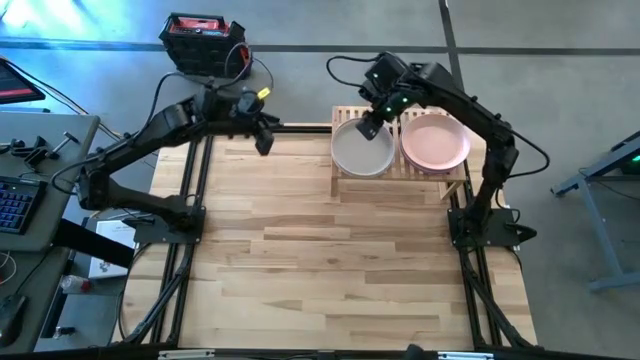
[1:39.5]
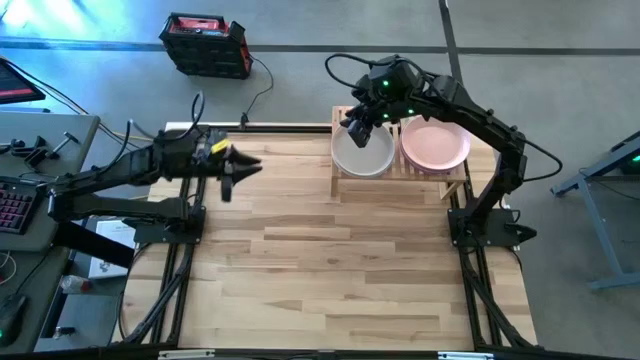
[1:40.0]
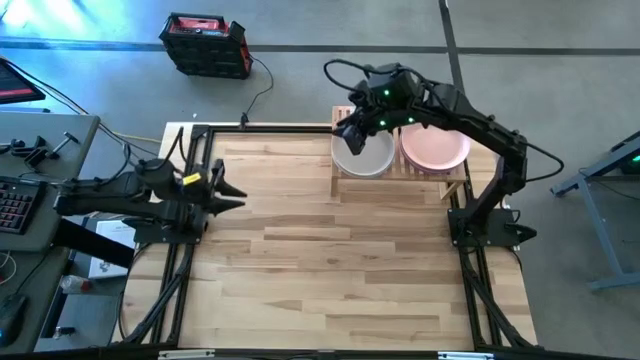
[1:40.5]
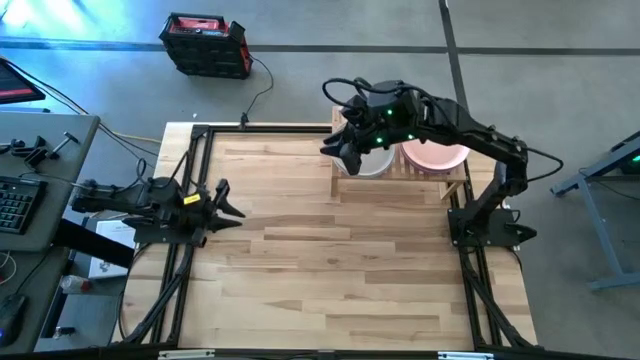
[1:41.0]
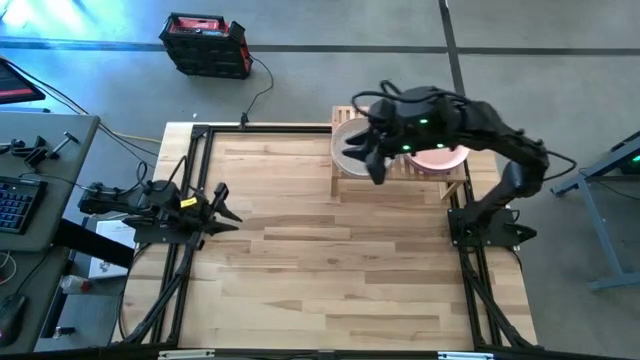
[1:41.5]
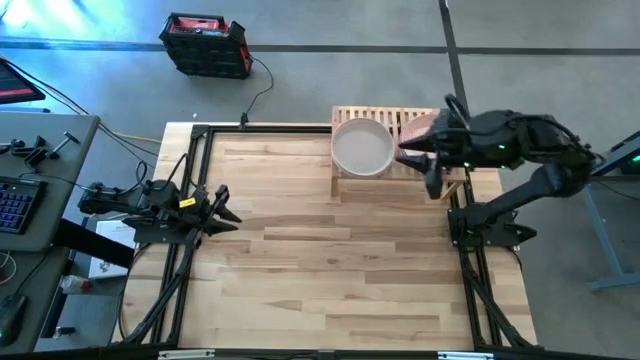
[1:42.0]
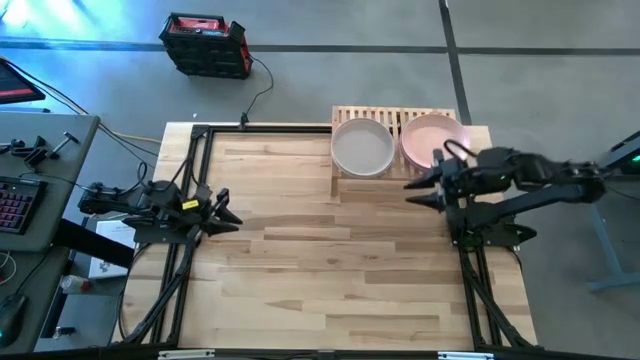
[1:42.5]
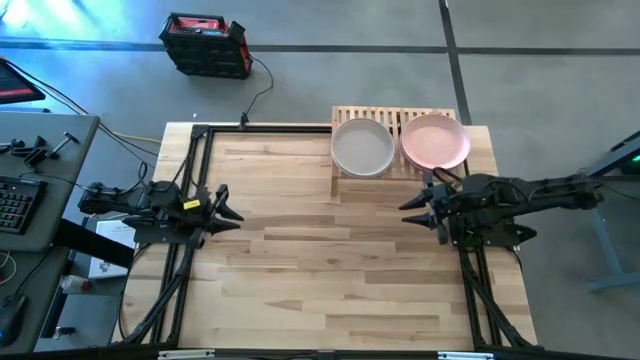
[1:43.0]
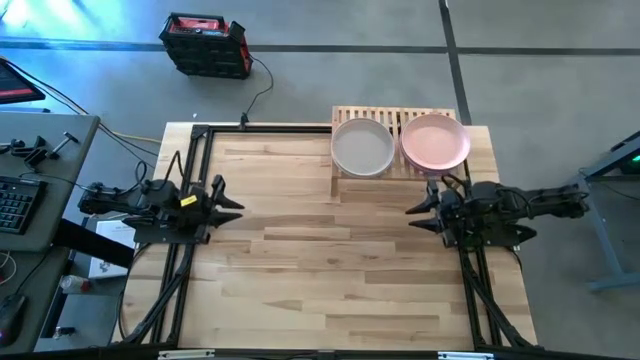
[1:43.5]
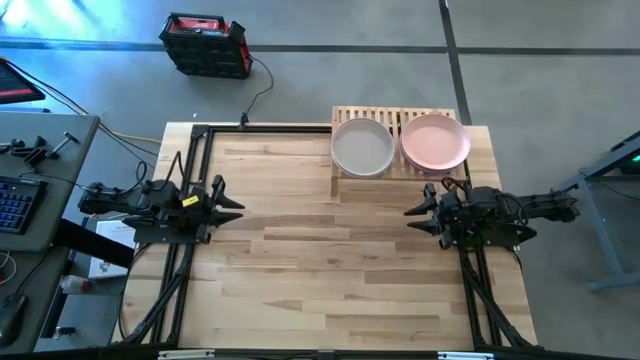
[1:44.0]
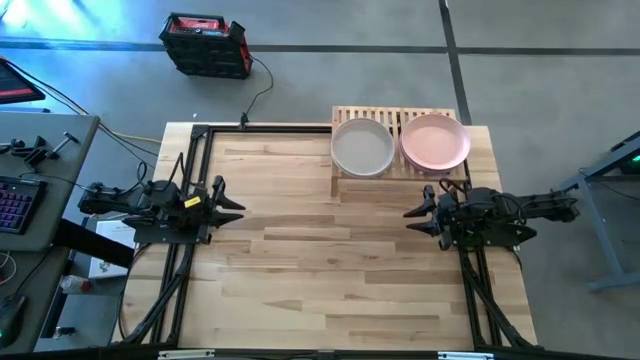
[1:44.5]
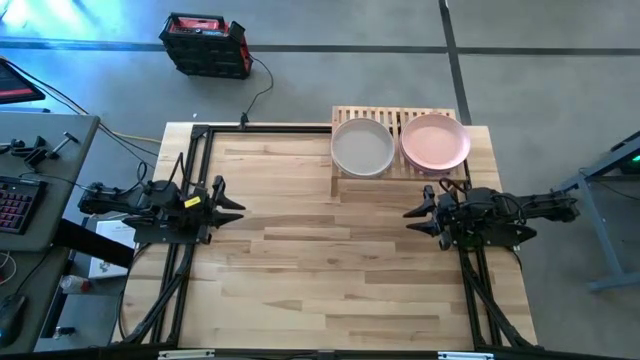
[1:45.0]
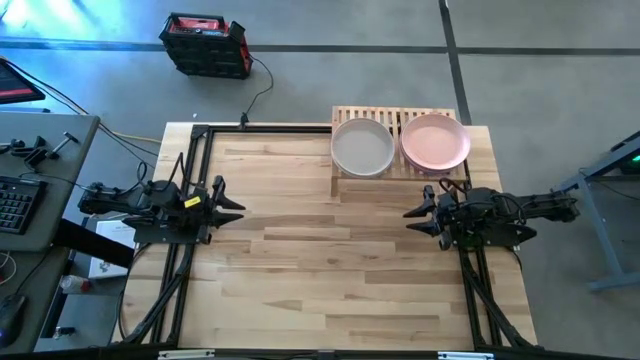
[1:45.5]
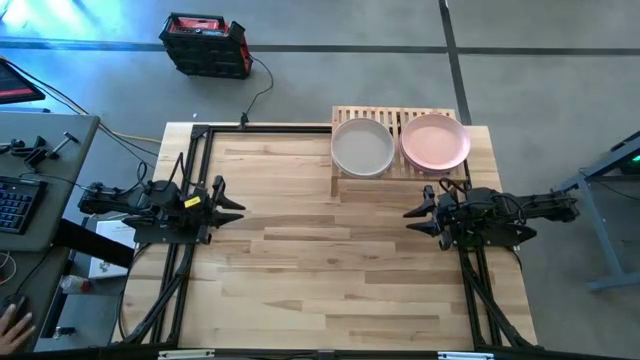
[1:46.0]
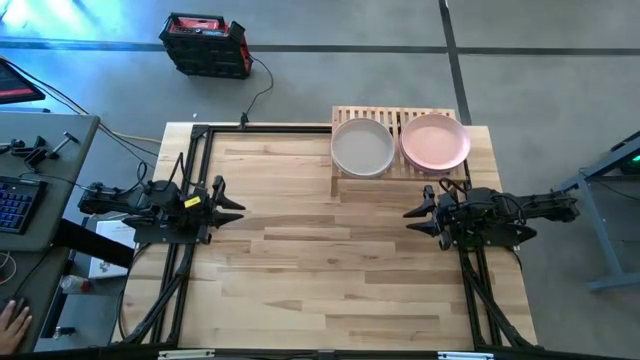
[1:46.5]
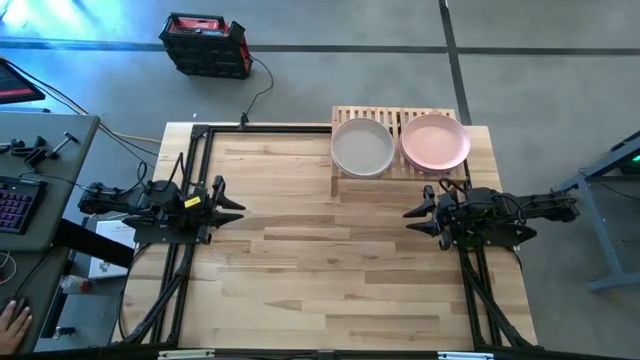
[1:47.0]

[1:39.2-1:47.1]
Task: Place and stack plates onto a shelf
Return to Home Position

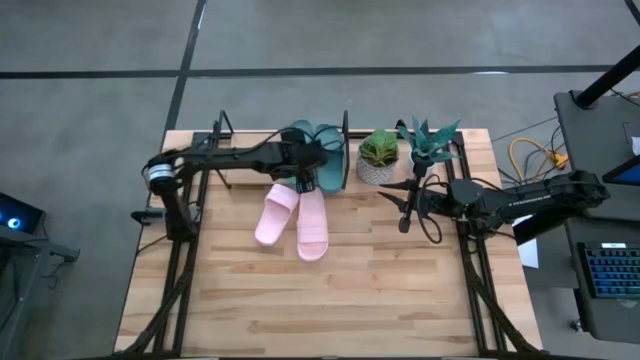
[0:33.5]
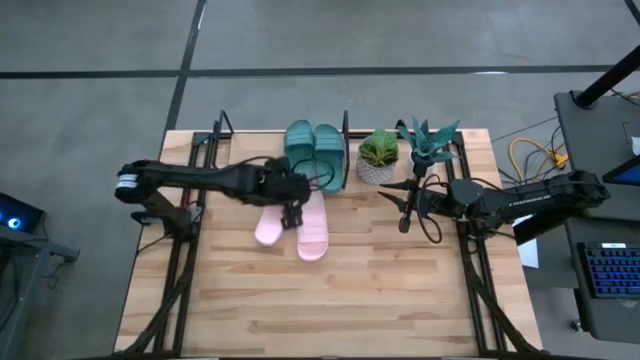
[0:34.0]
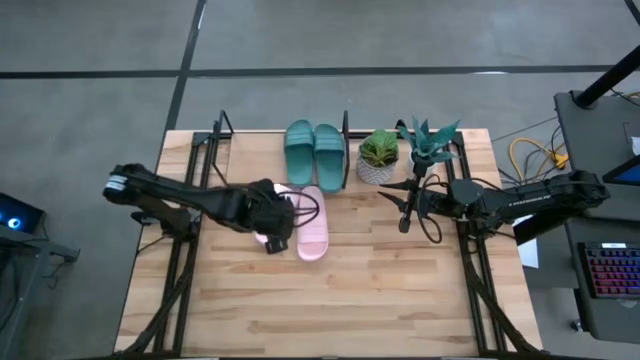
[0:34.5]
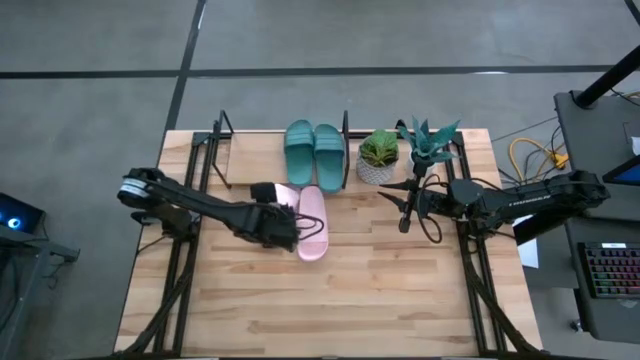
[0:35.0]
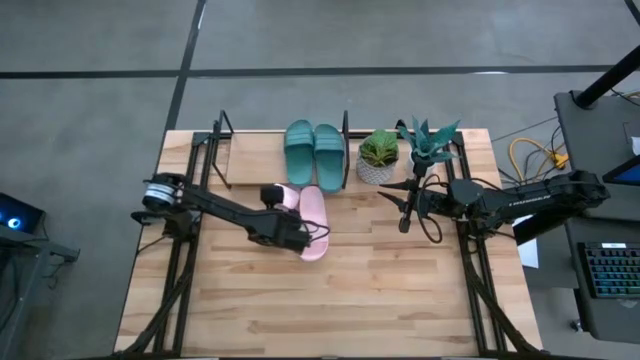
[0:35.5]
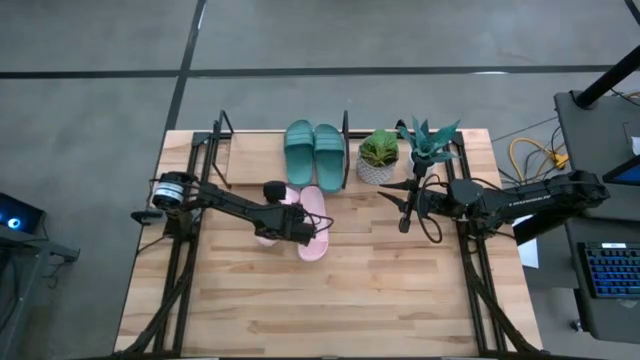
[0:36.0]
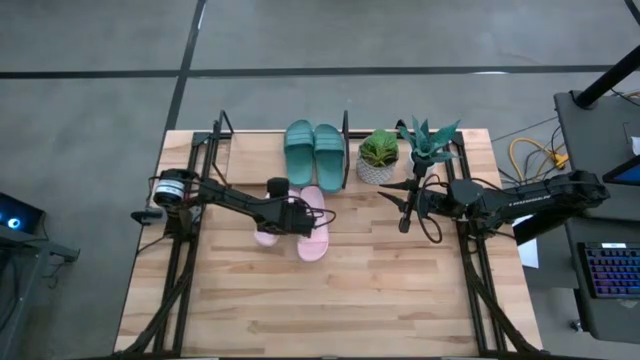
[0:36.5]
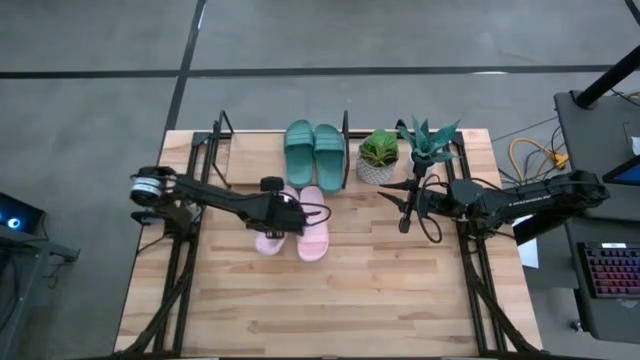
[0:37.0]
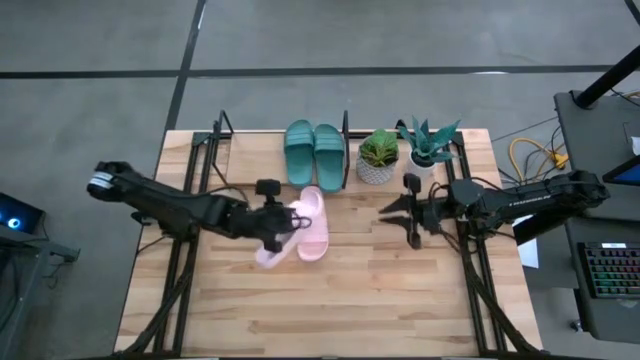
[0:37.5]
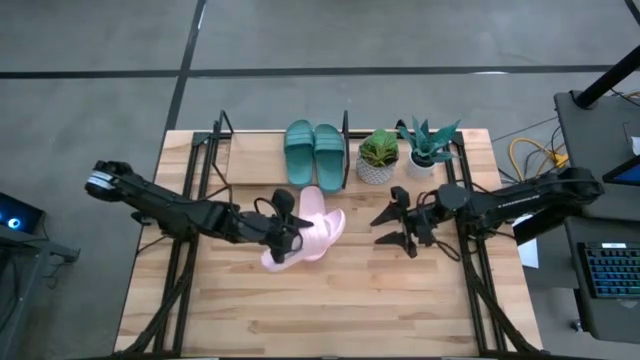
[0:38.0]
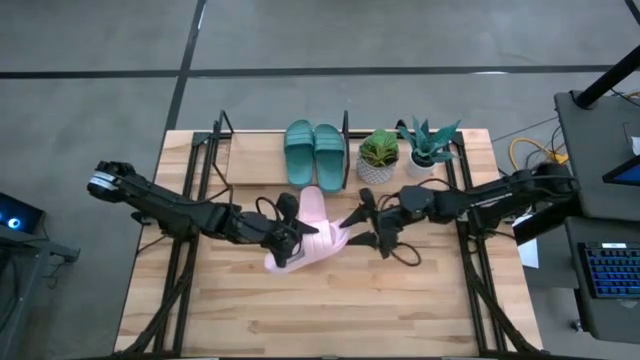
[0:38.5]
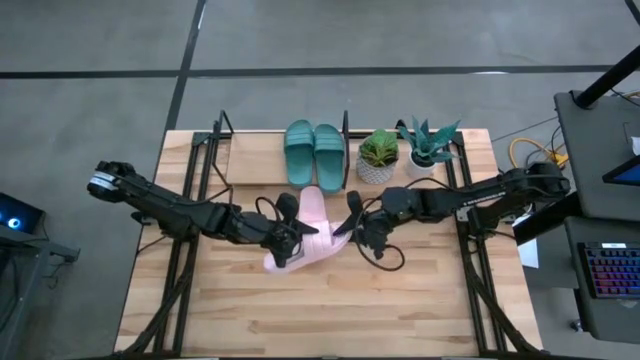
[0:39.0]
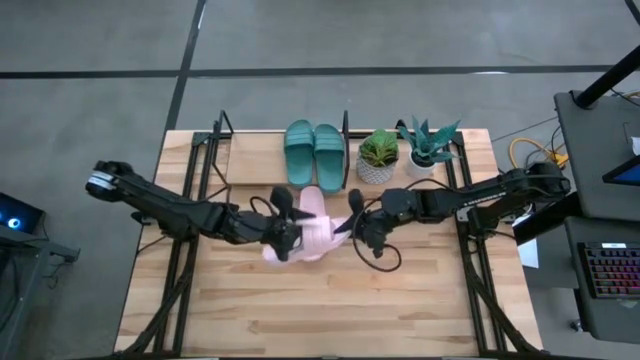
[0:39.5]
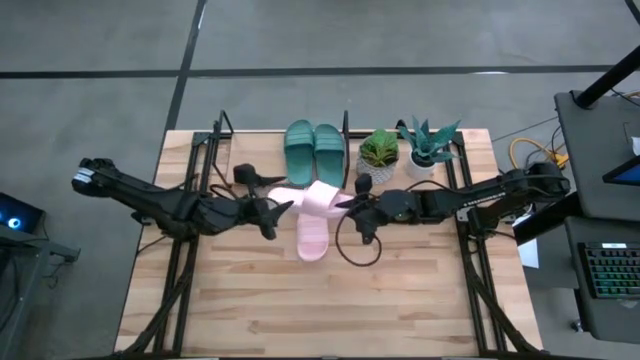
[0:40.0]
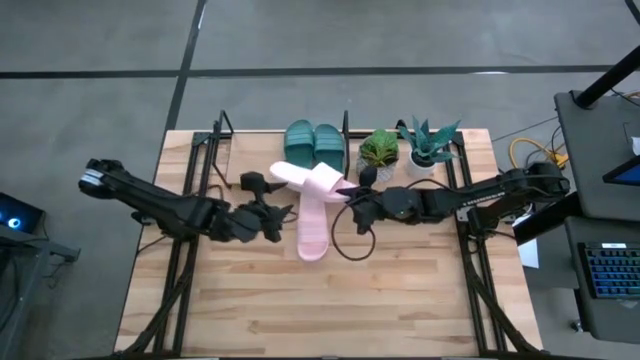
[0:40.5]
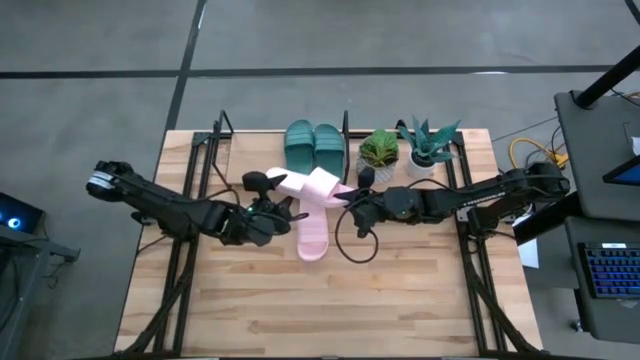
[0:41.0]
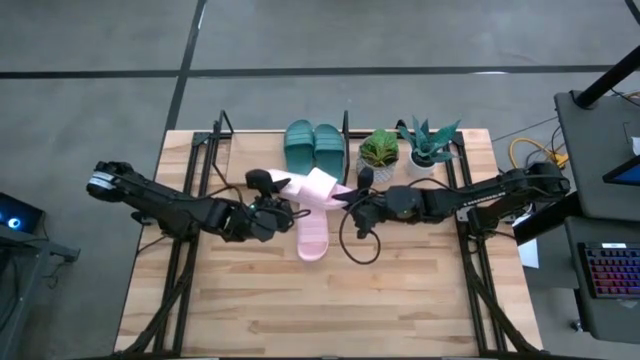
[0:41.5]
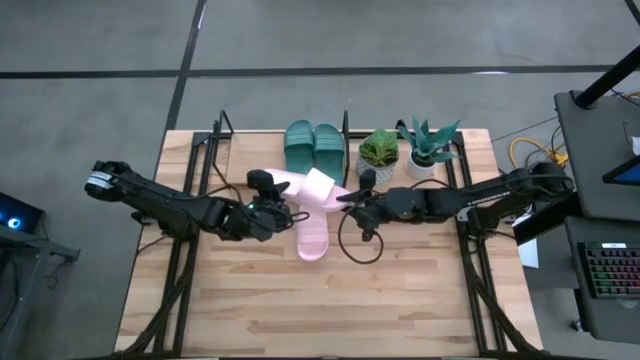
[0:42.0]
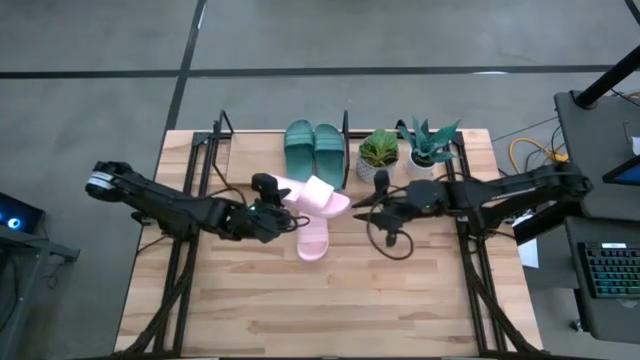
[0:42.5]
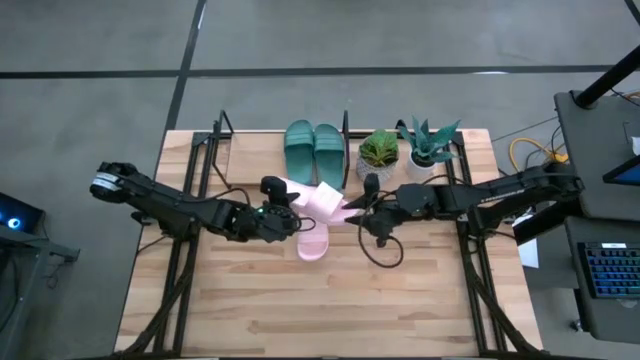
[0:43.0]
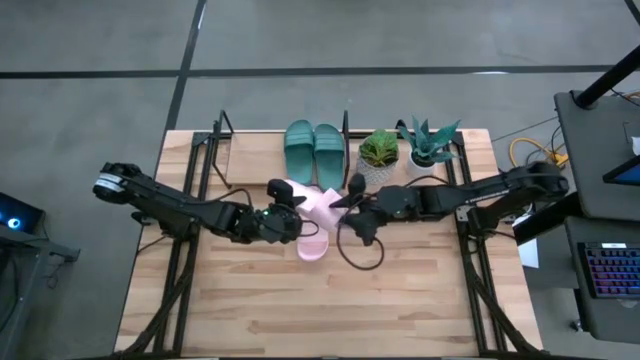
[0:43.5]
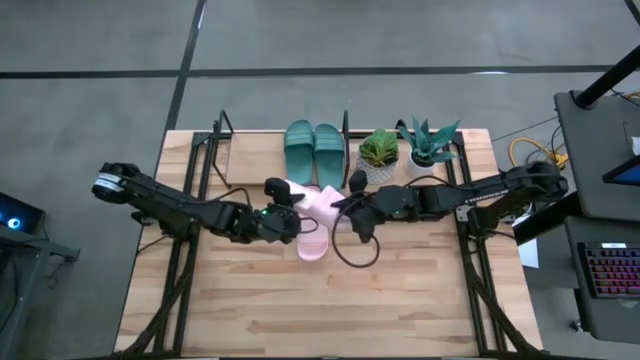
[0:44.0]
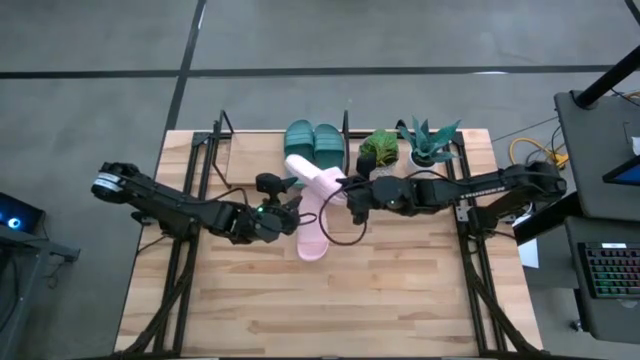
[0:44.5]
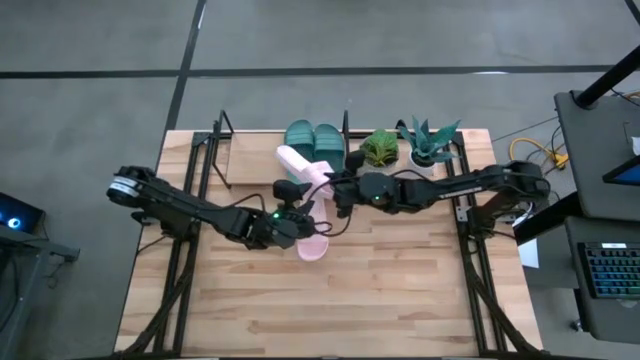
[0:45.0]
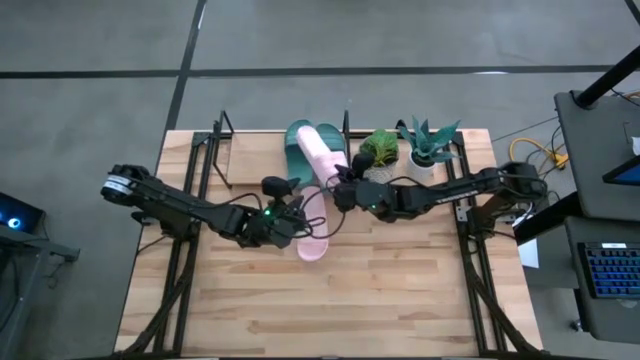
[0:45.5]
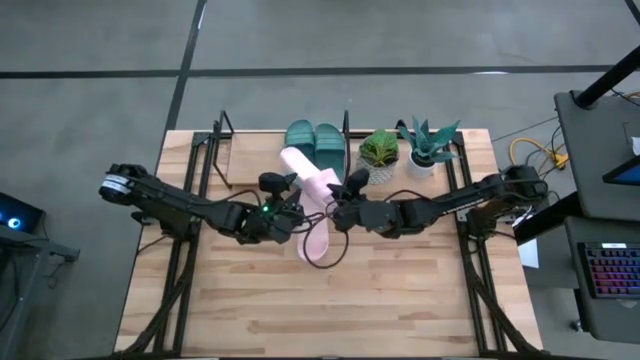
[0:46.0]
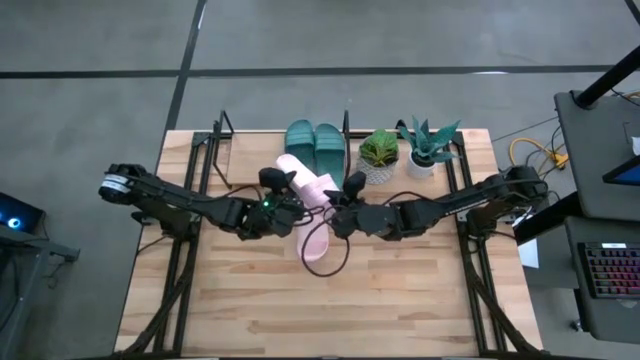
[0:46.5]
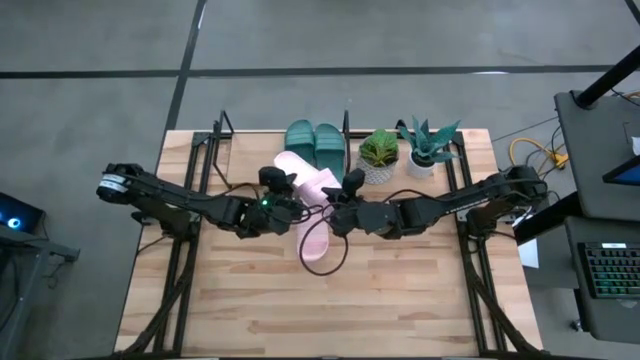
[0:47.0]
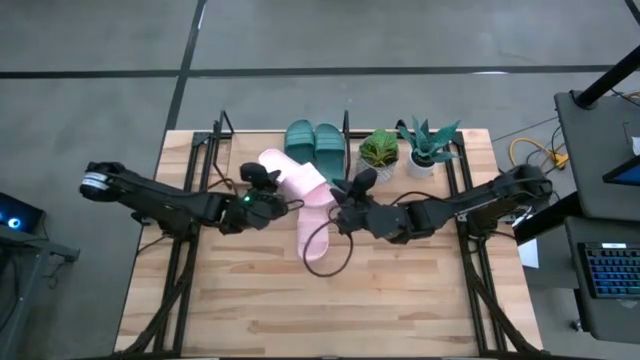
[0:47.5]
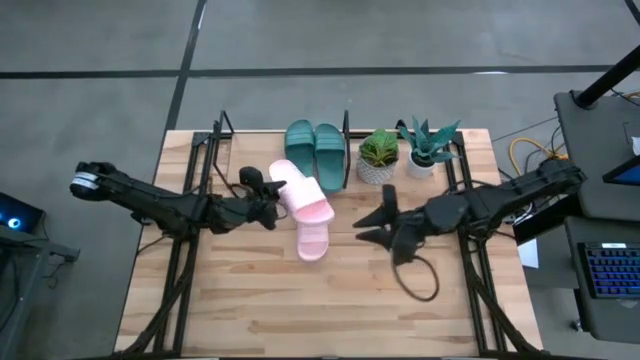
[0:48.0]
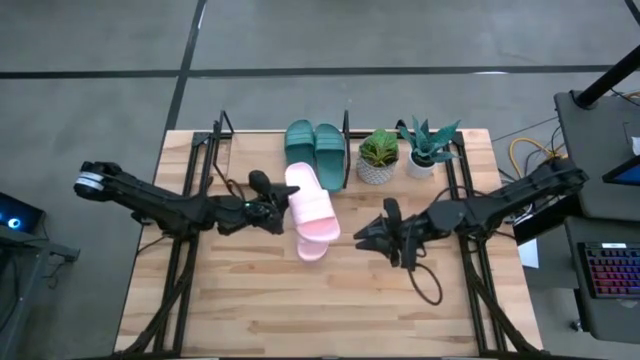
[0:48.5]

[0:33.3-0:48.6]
Task: Pick and place slides into the shelf
Put the left pink slide into the shelf
